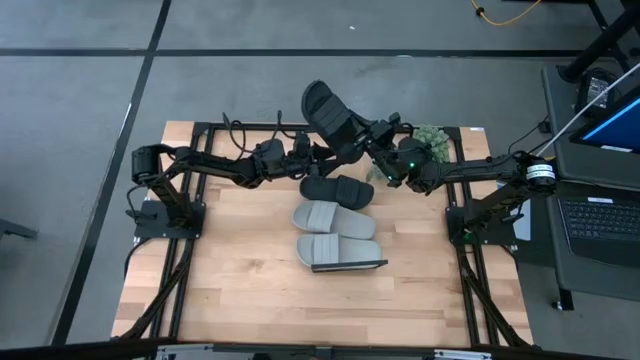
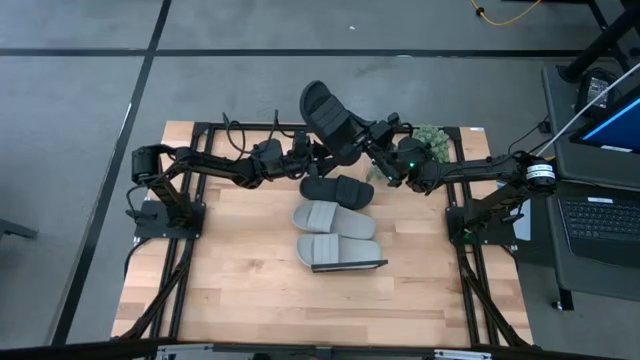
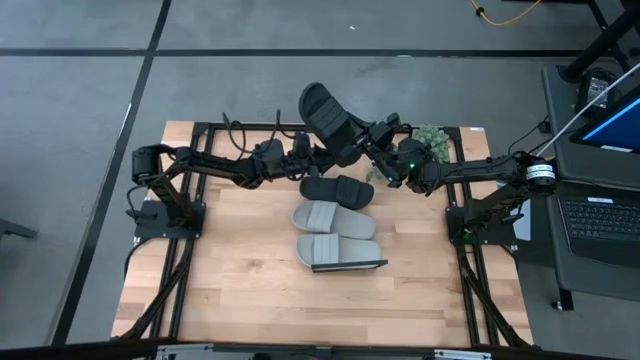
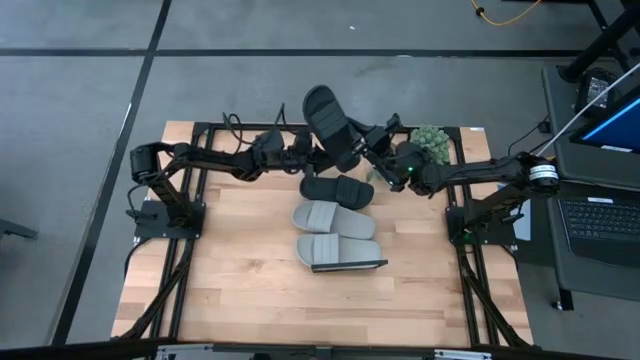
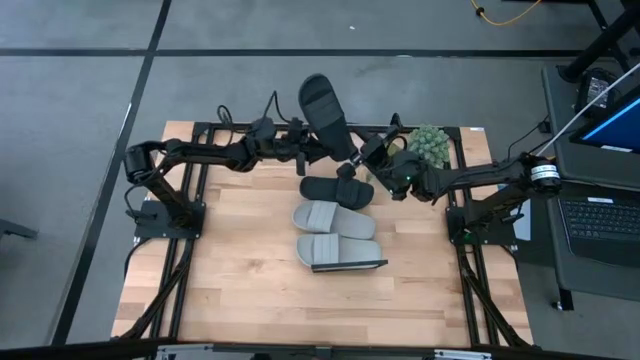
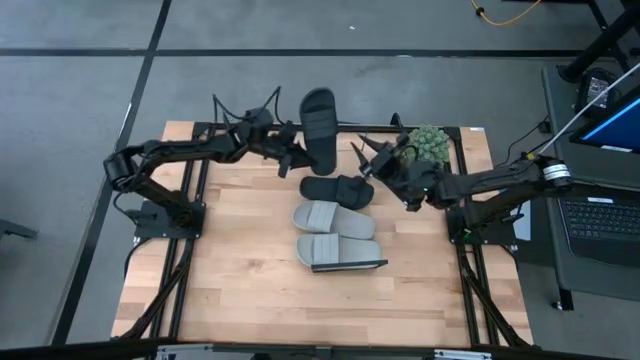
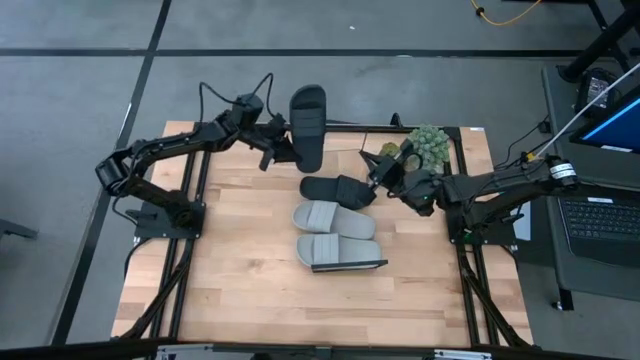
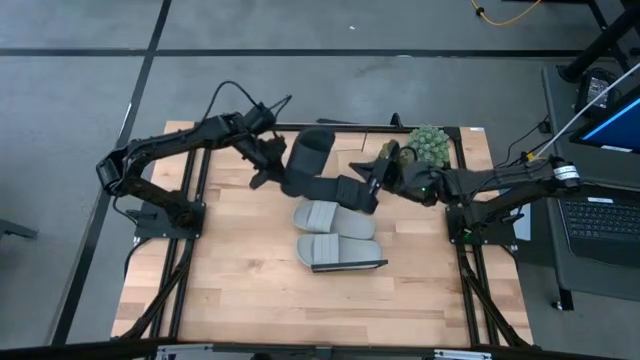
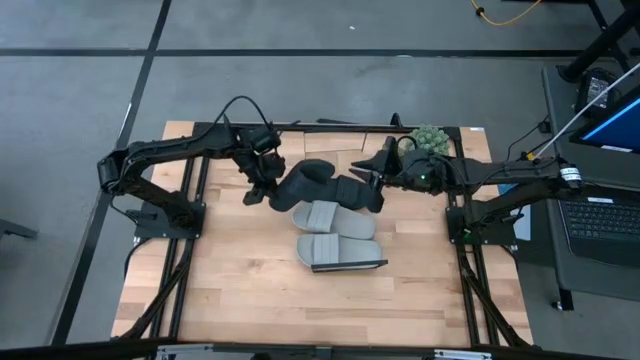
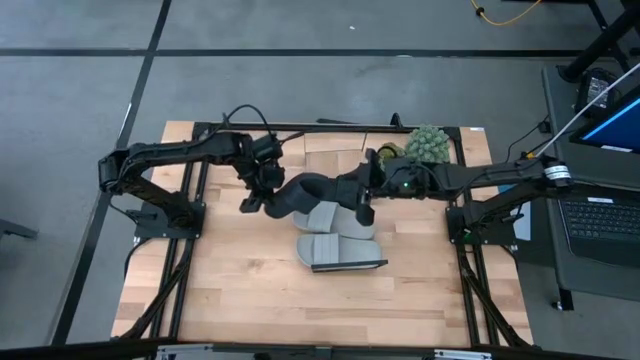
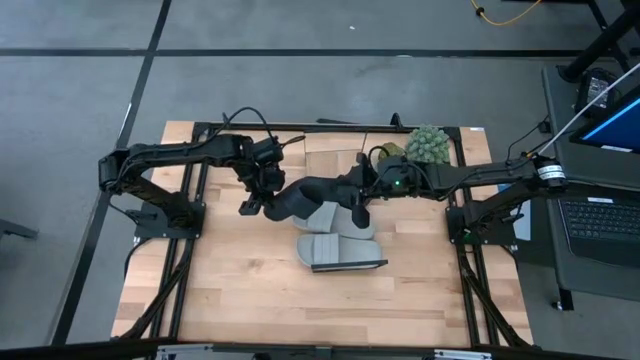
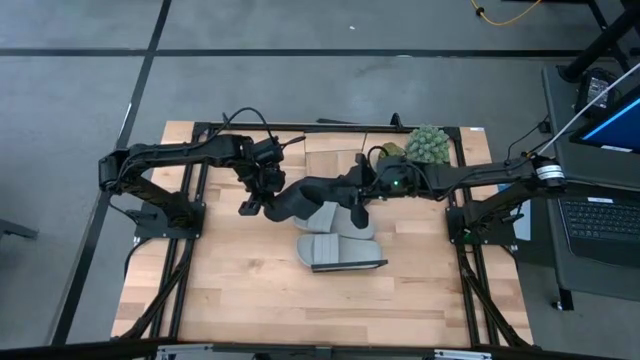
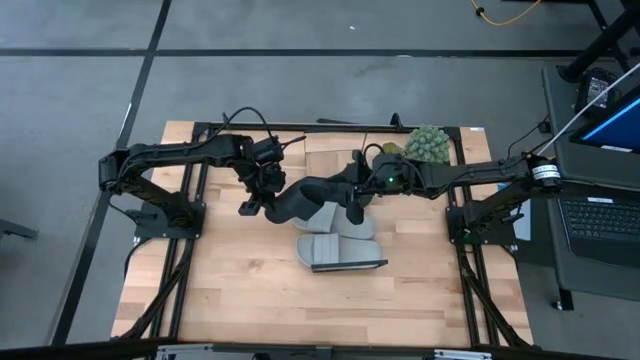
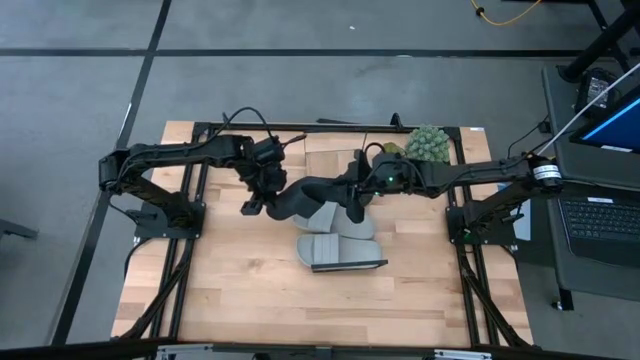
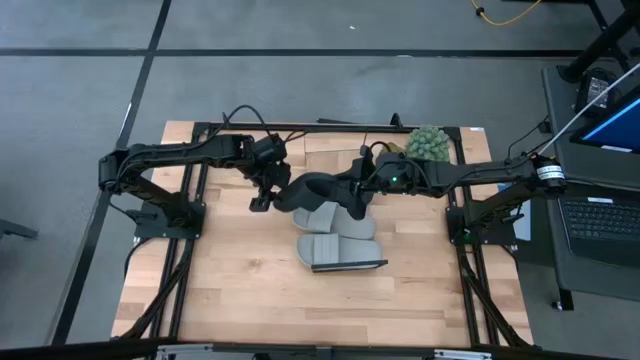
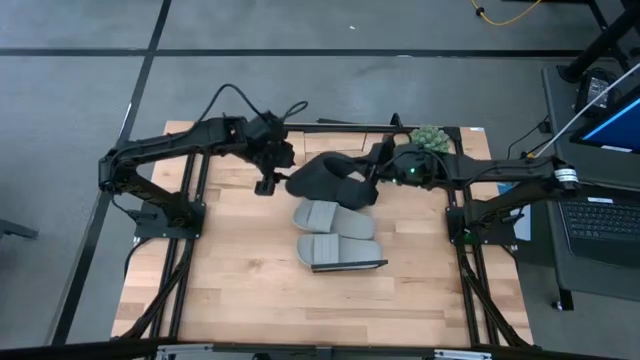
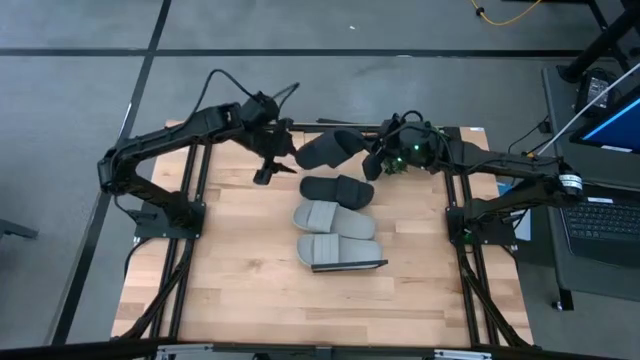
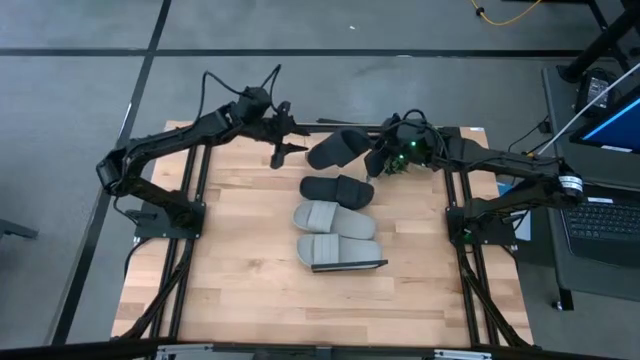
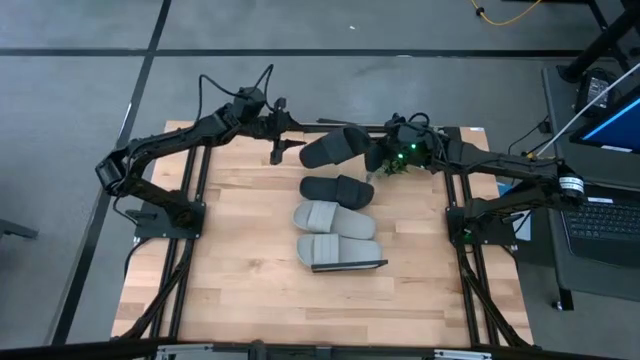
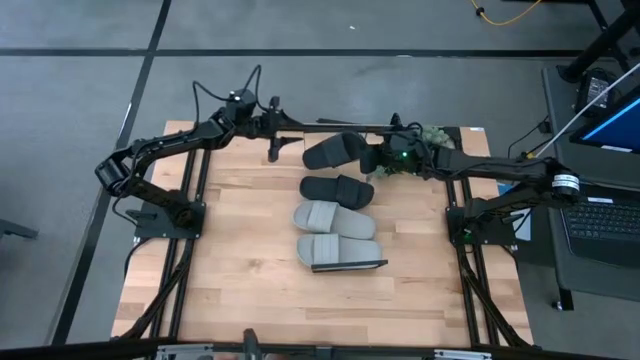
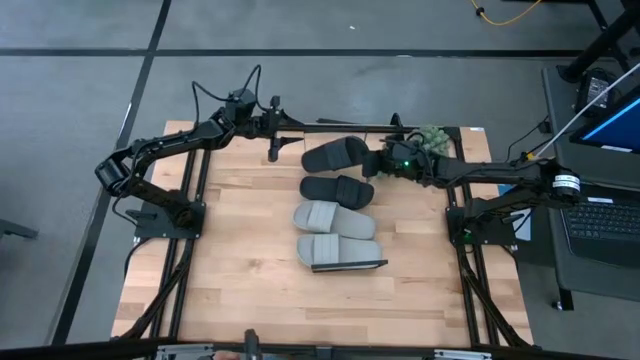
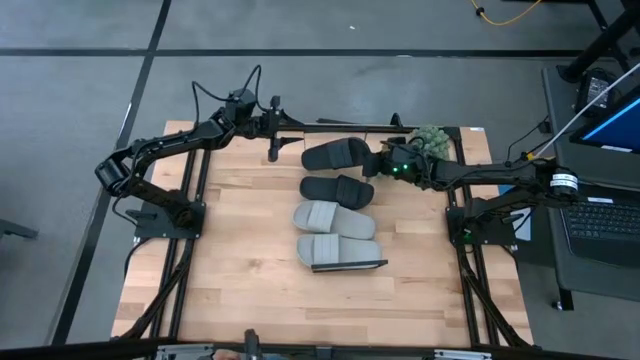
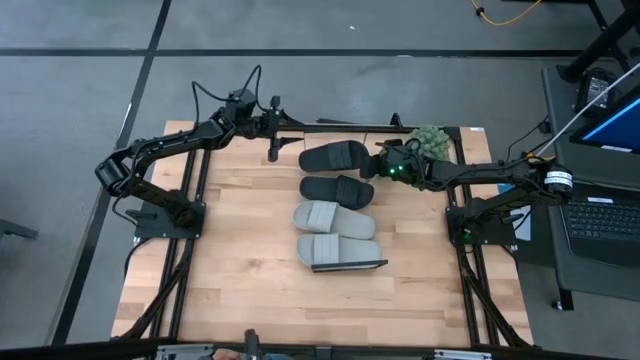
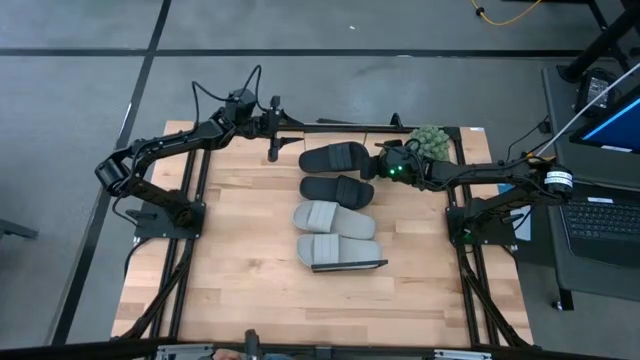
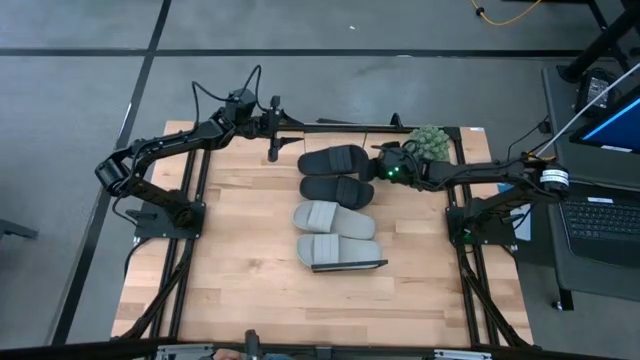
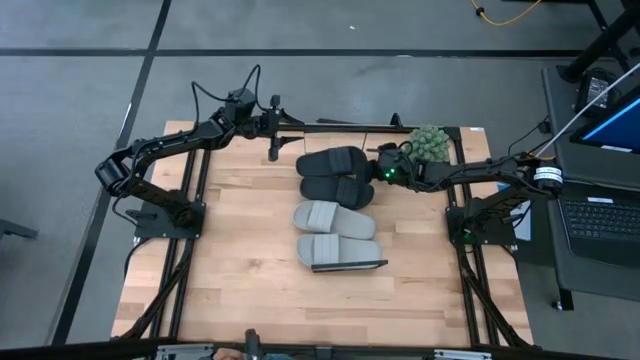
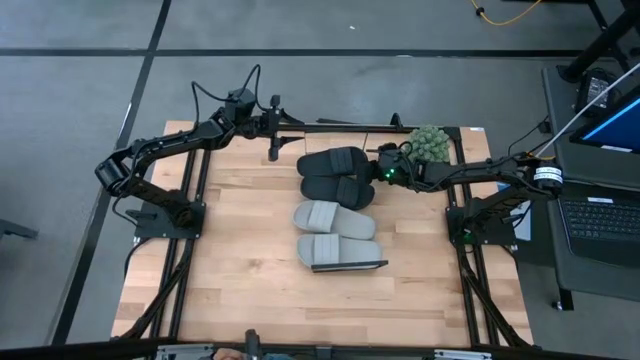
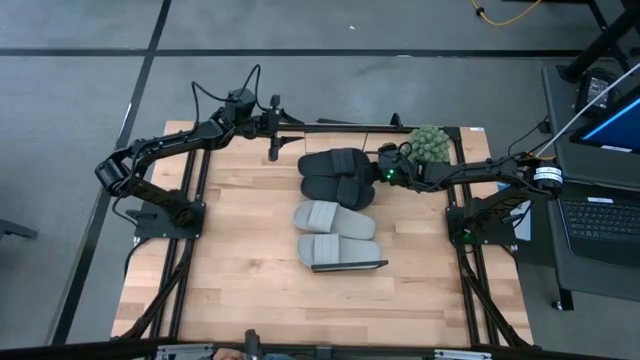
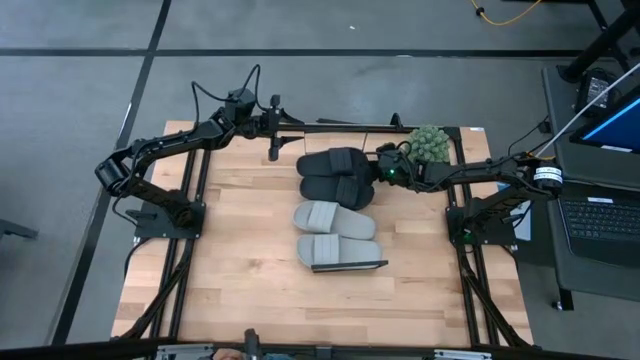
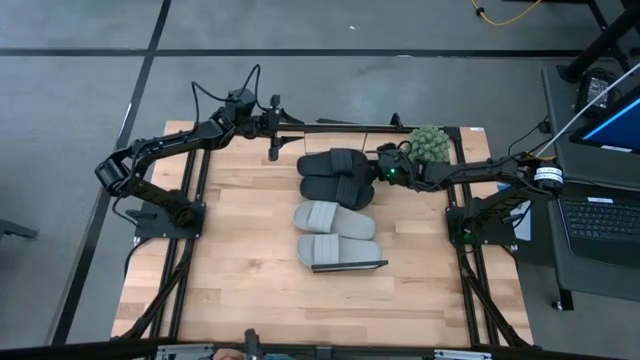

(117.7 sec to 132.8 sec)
Task: Pick and place slides into the shelf
Put the black slipper on the shelf

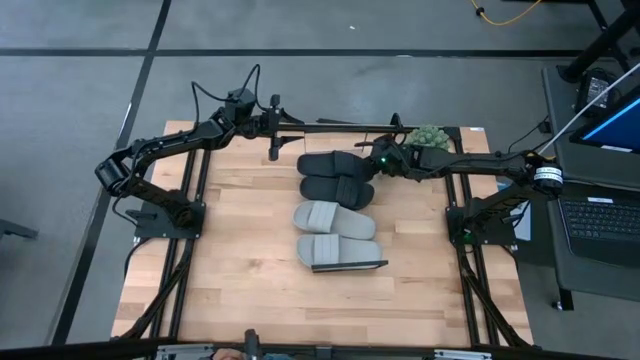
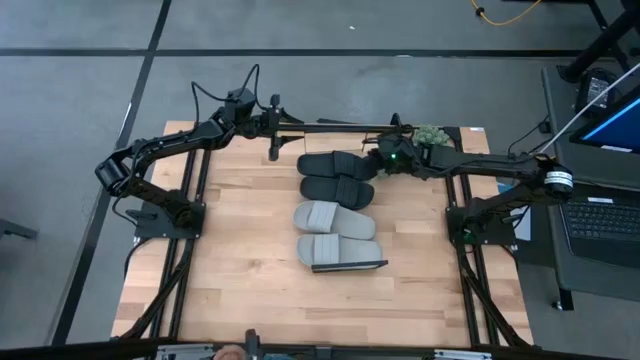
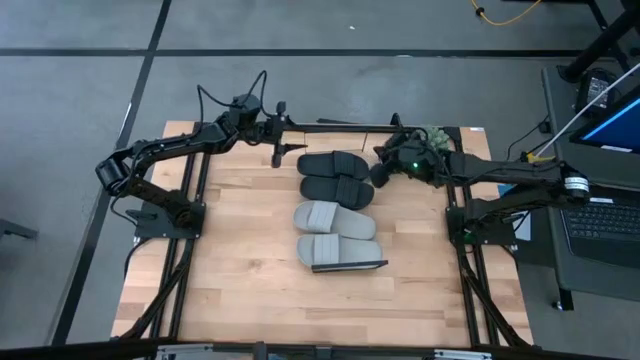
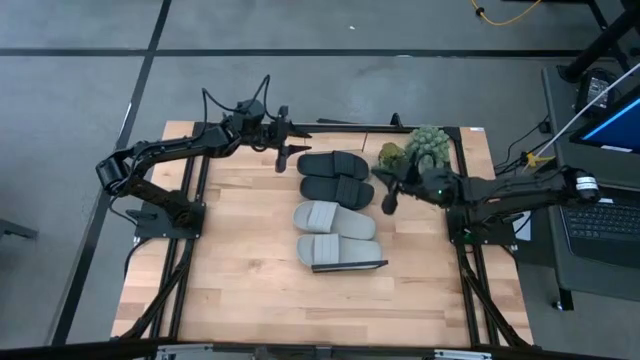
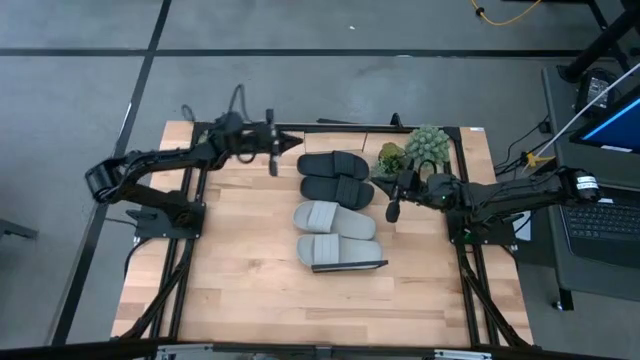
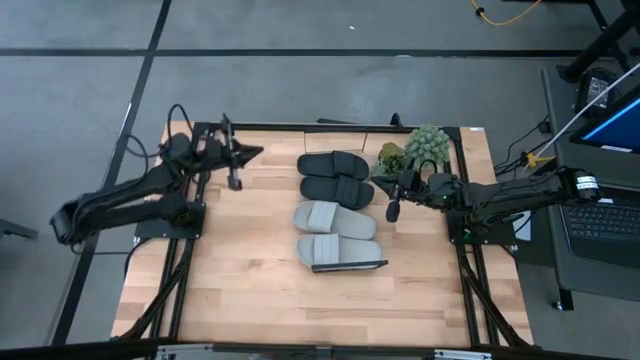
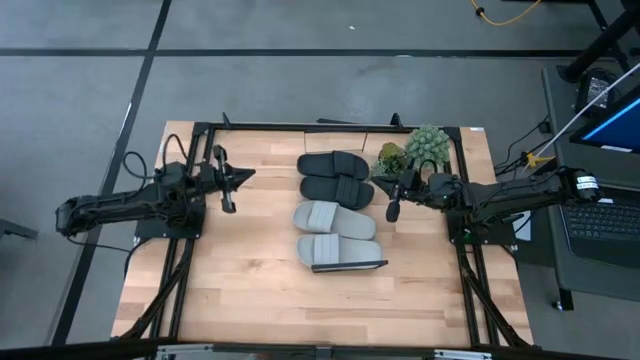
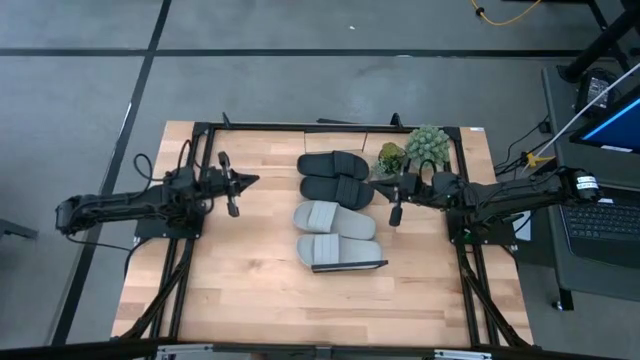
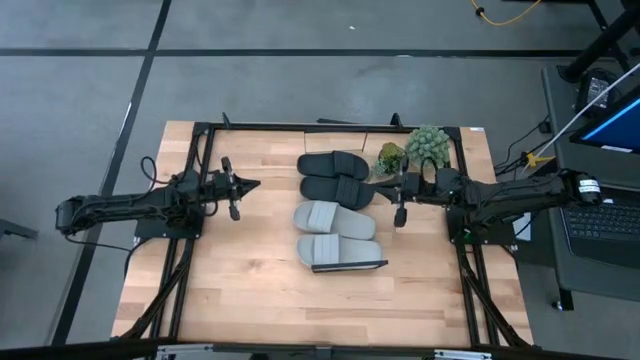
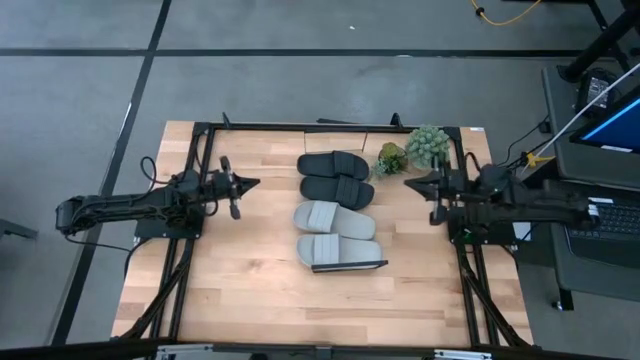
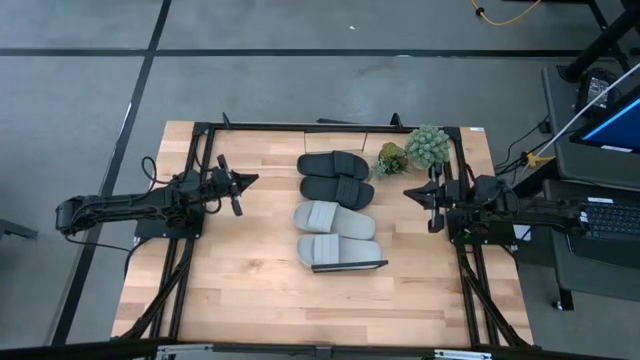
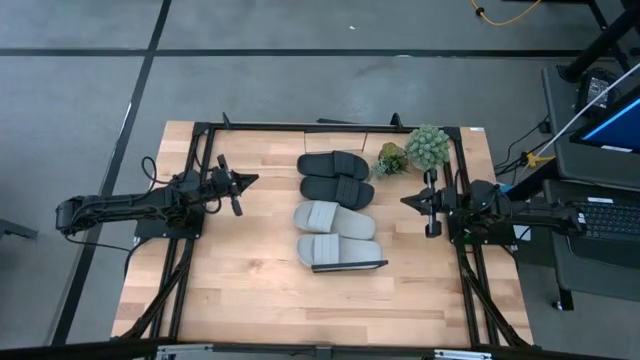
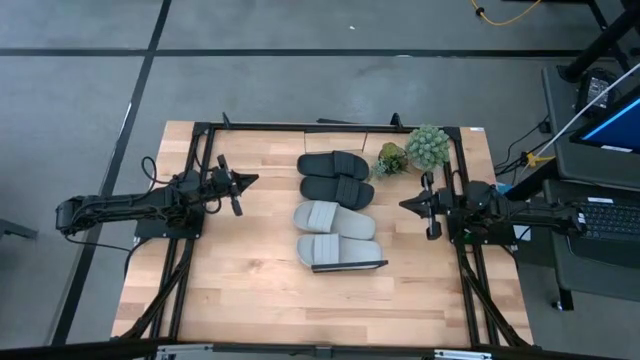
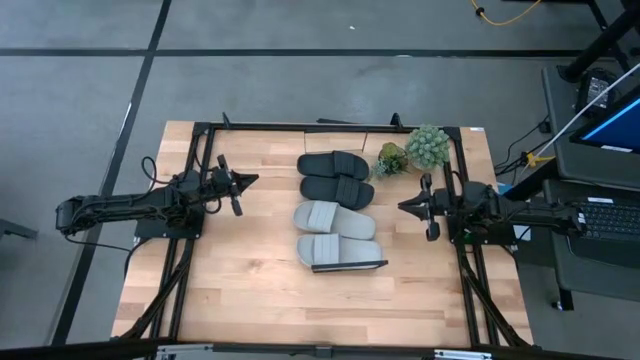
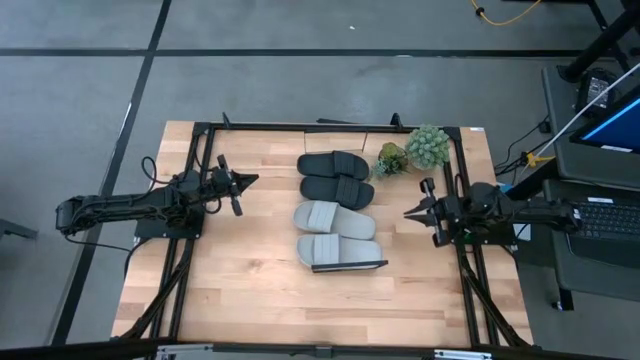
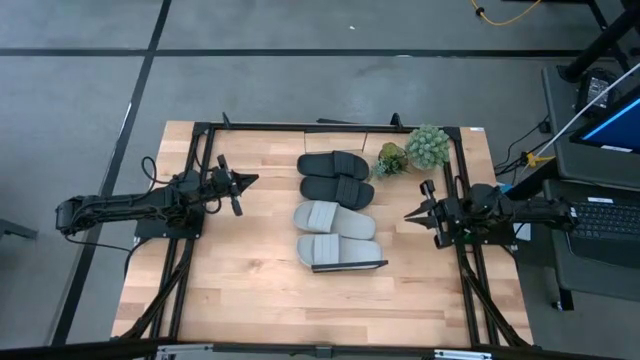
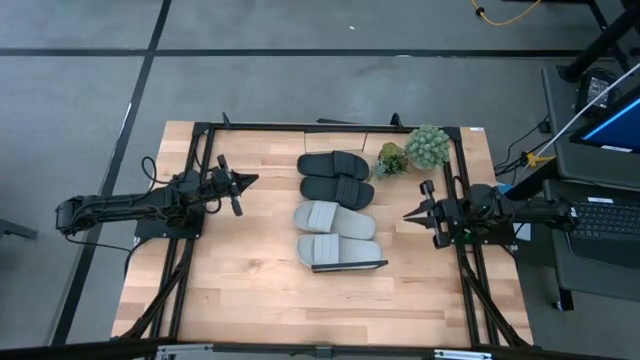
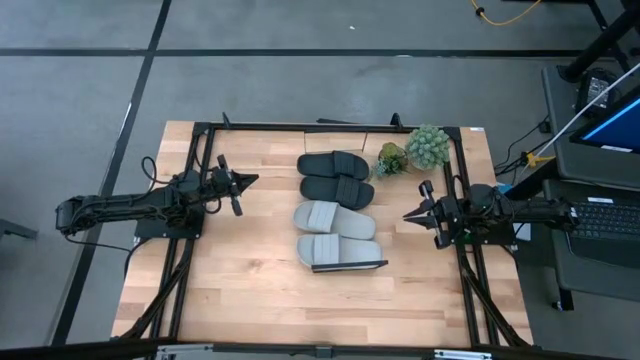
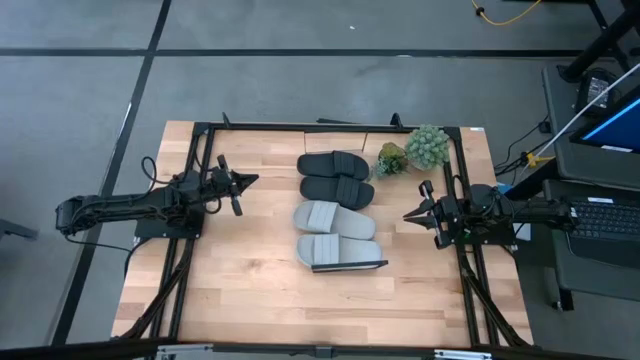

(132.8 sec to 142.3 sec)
Return to Home Position
